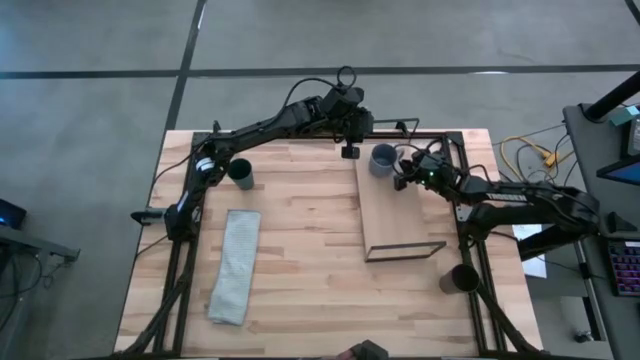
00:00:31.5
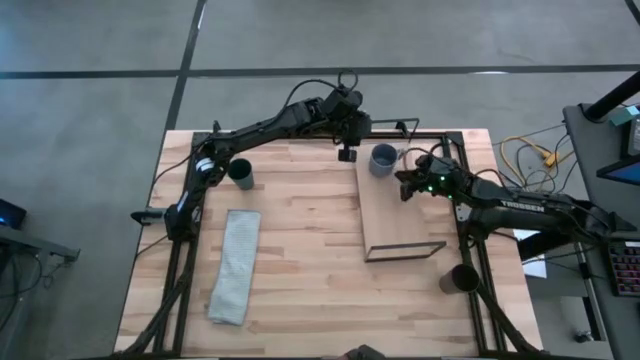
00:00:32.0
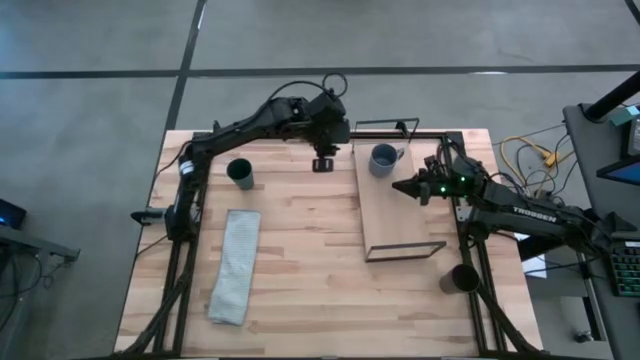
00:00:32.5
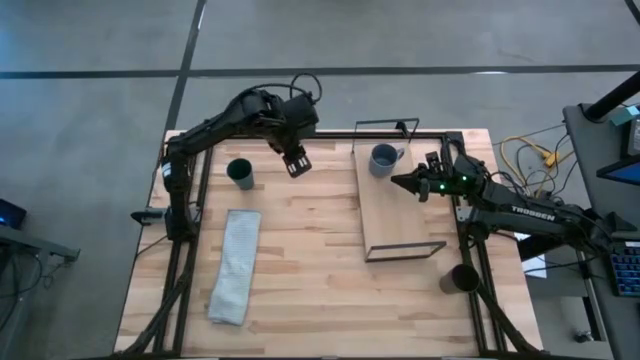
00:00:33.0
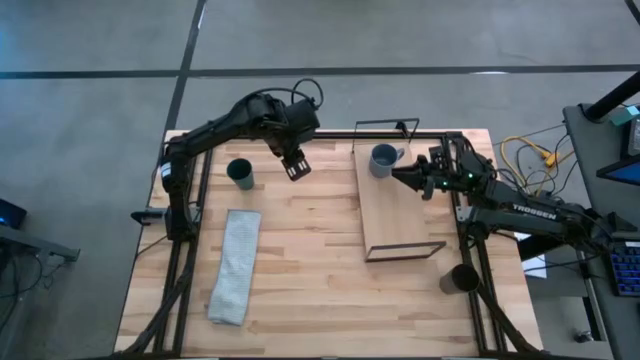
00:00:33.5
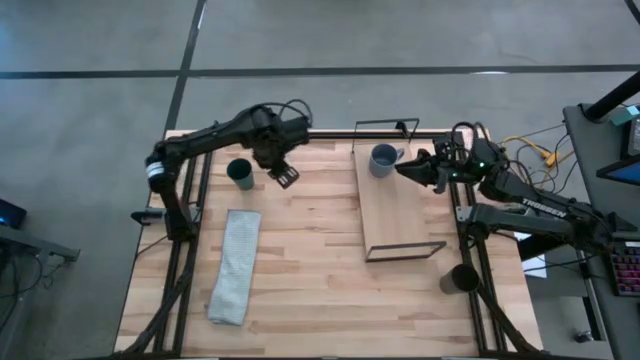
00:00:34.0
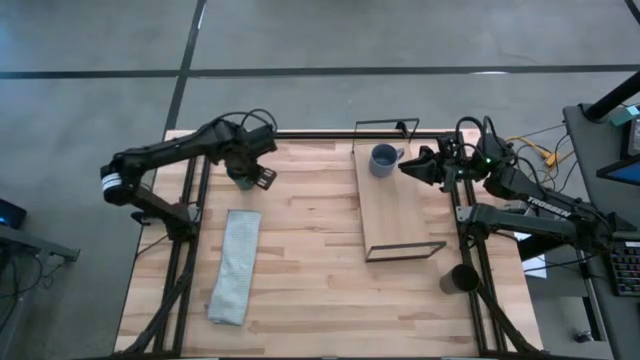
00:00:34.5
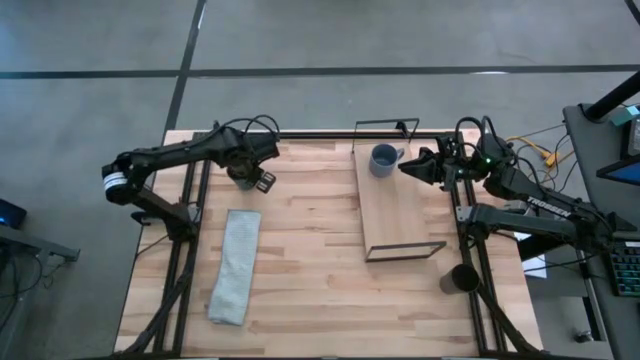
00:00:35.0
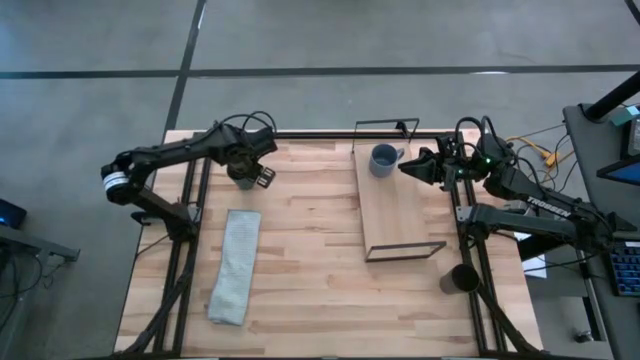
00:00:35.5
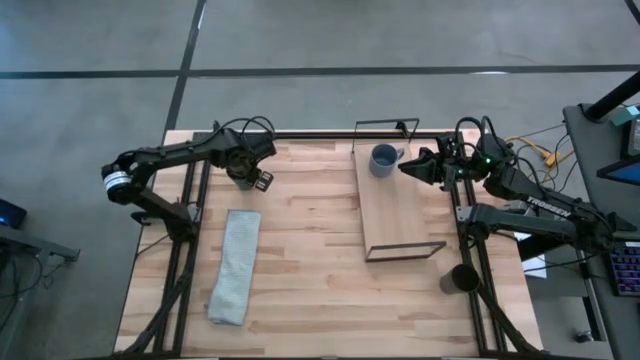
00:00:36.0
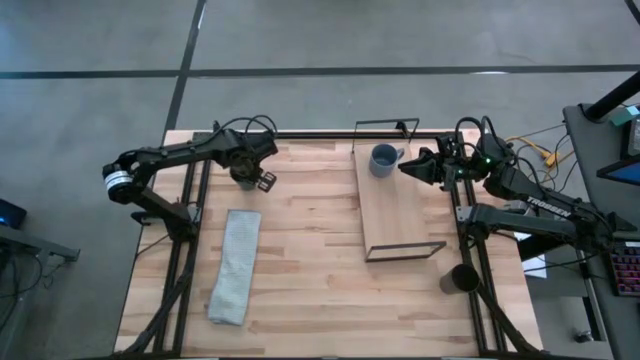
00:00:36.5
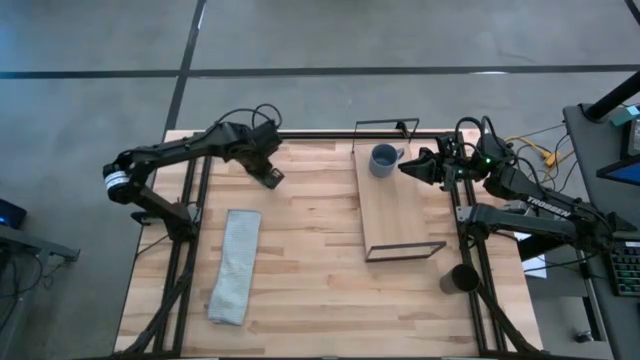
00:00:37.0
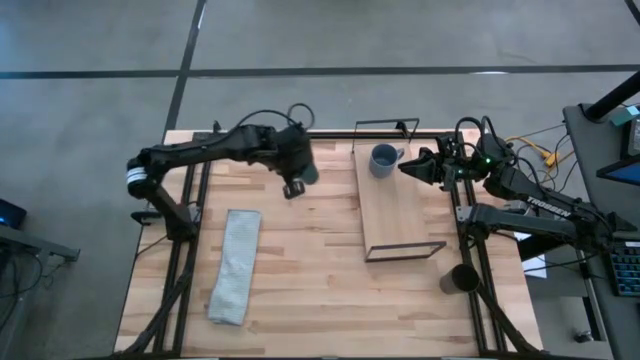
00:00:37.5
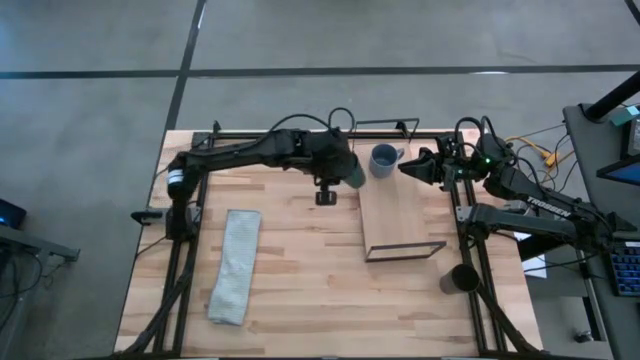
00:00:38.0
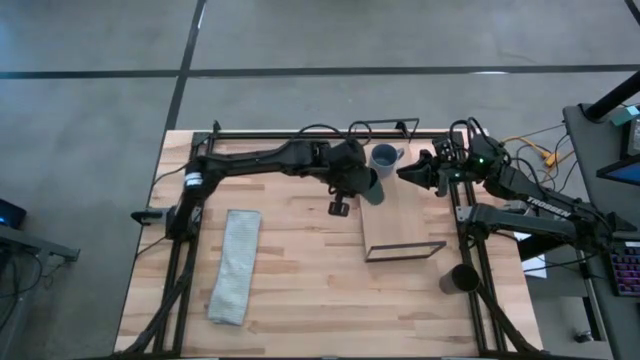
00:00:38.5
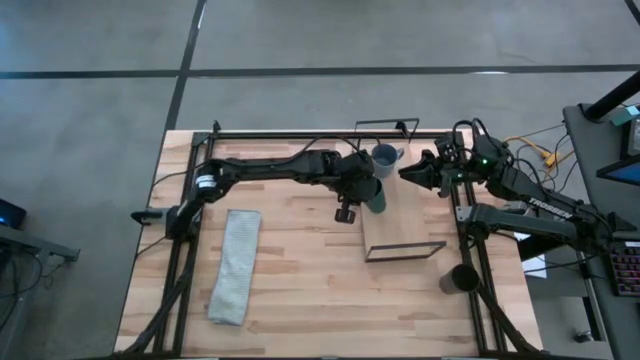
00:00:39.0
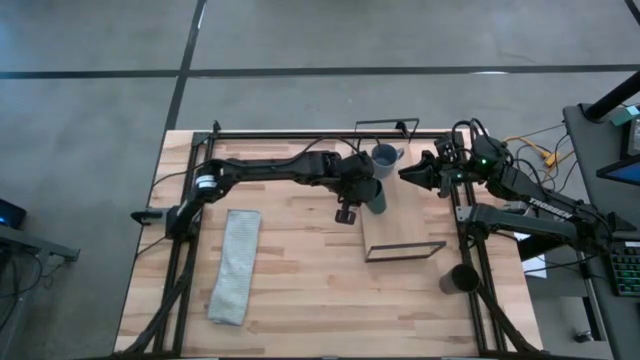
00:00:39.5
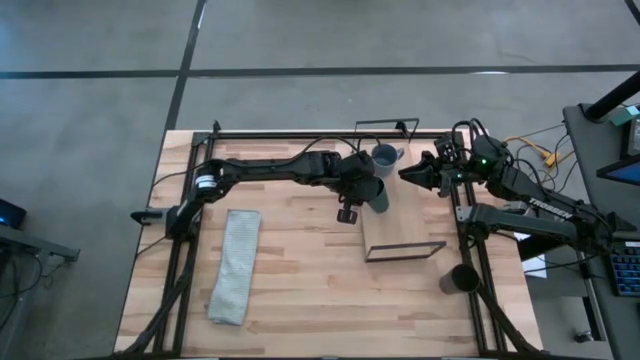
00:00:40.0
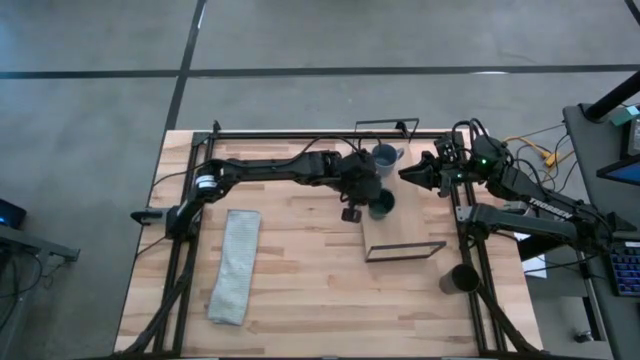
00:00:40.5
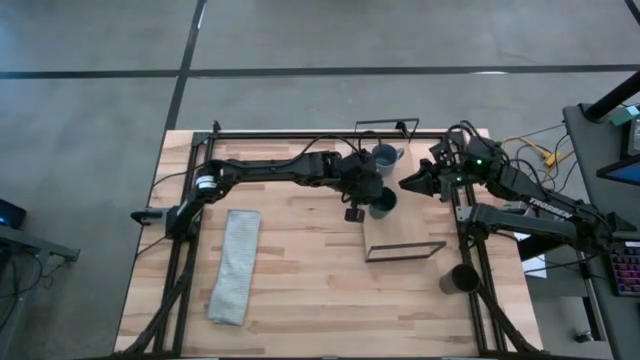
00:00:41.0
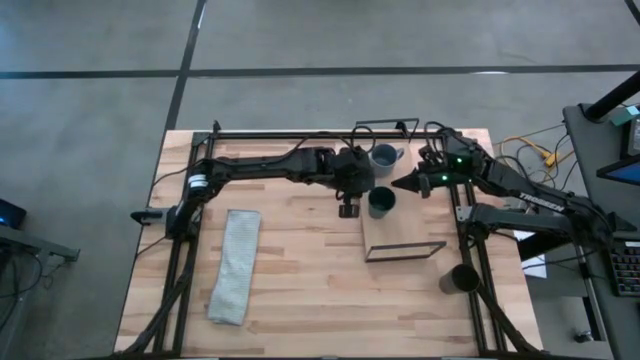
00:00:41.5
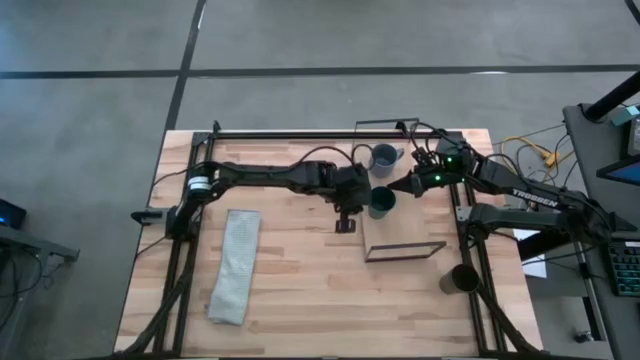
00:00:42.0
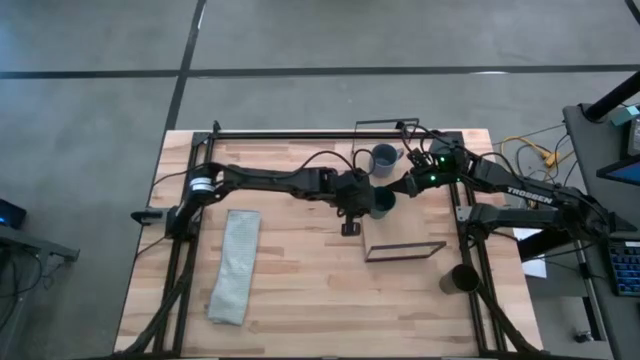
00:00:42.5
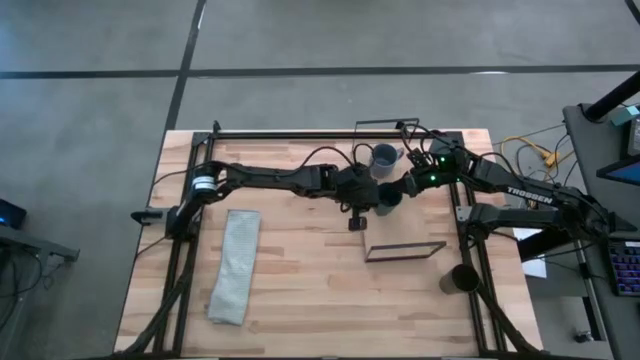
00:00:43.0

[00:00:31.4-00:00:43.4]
Task: Stack small to large cups/mugs on shelf
Put the blue cup on the shelf

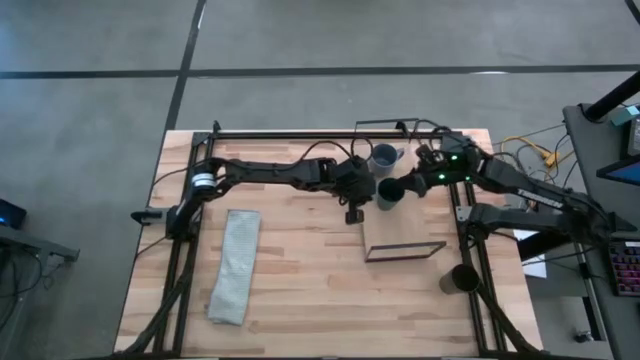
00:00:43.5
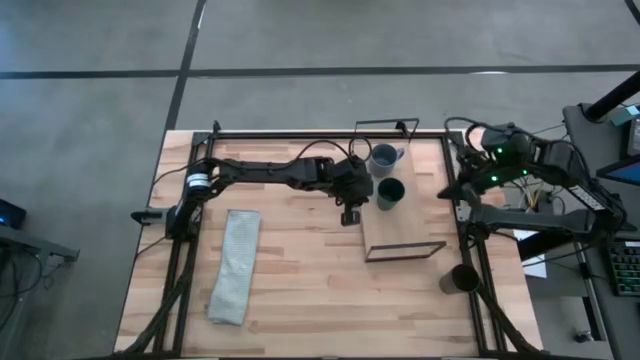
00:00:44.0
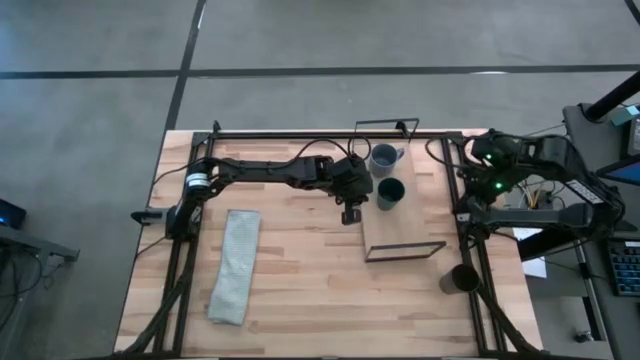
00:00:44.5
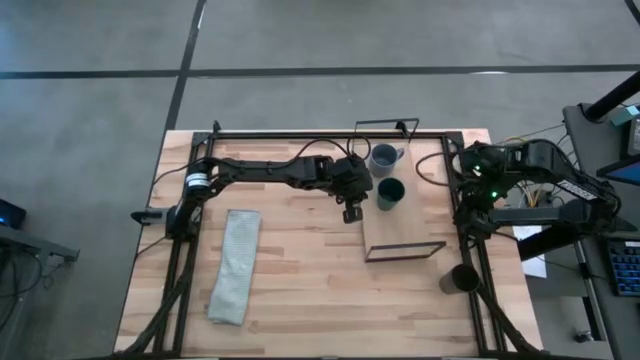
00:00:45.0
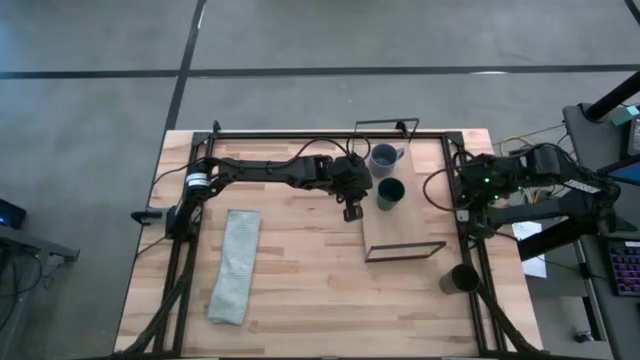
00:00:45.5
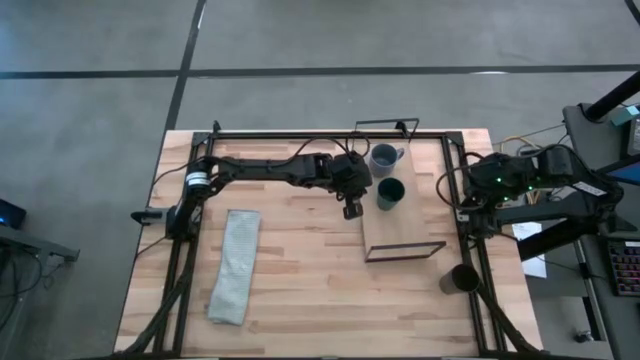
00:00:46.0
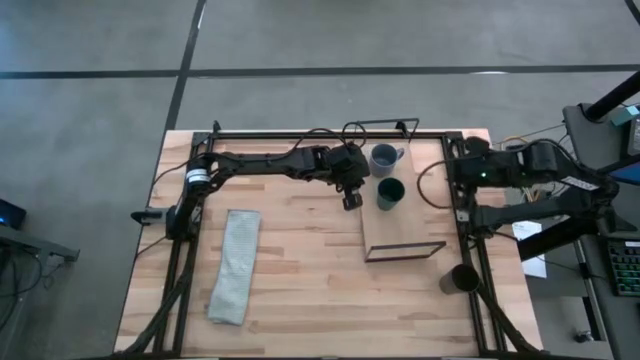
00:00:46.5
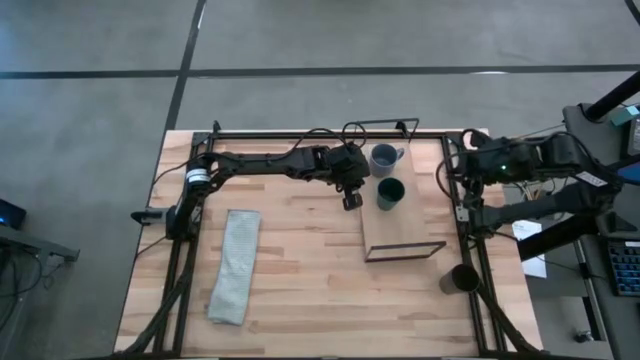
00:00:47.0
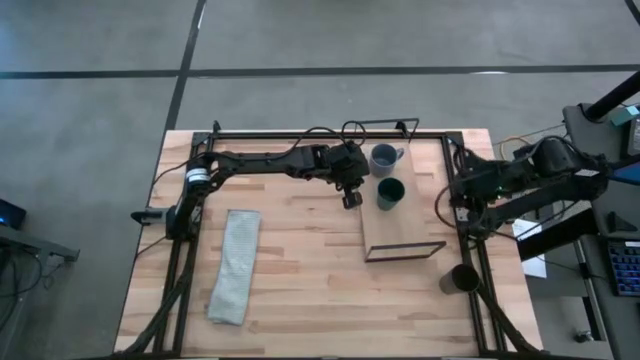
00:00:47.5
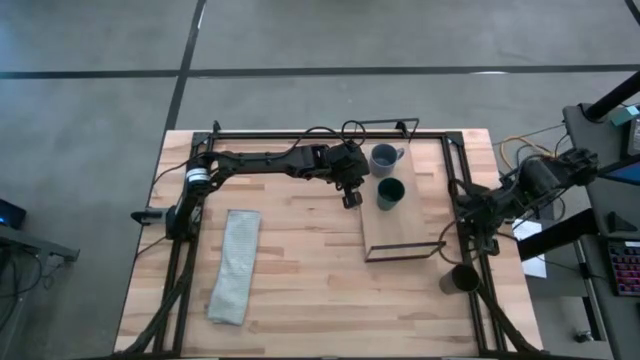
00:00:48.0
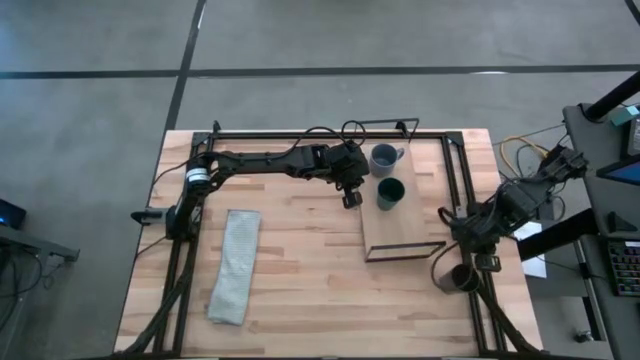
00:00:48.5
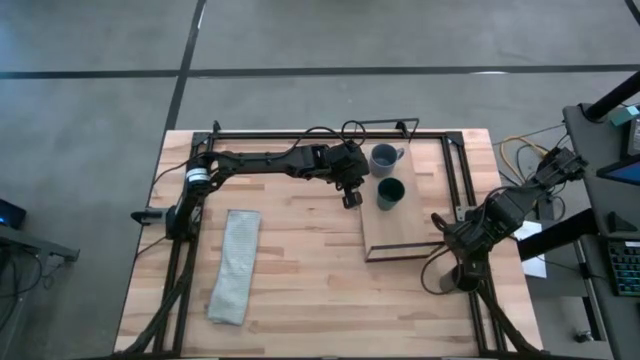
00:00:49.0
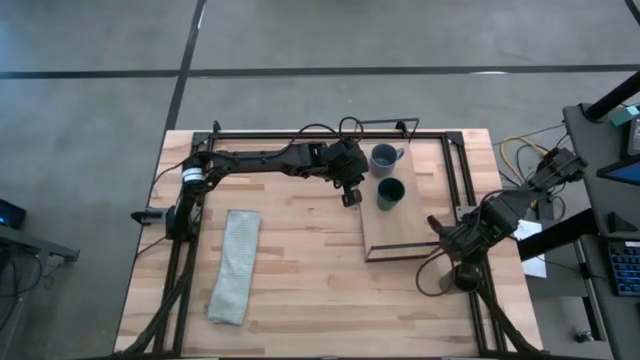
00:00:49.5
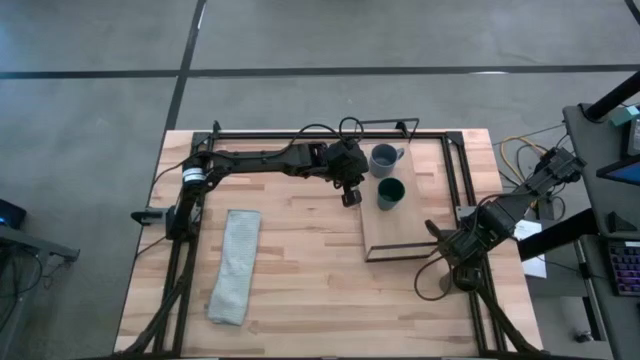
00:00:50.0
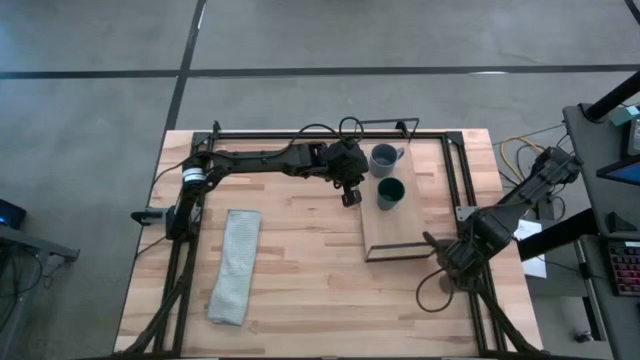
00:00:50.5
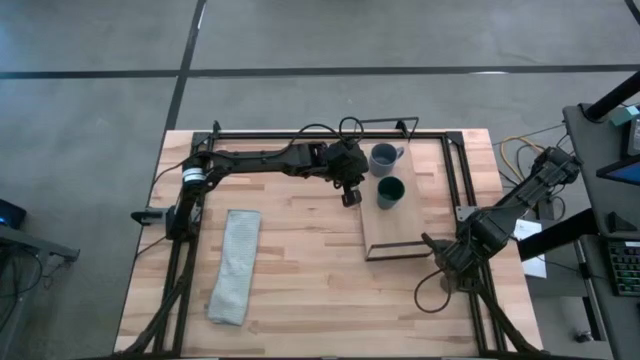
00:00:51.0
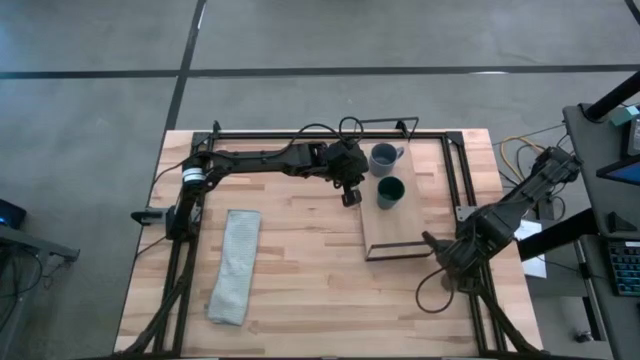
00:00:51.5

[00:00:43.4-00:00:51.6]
Put the black cup on the shelf

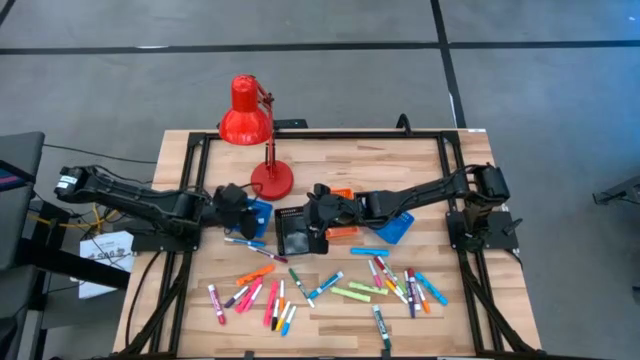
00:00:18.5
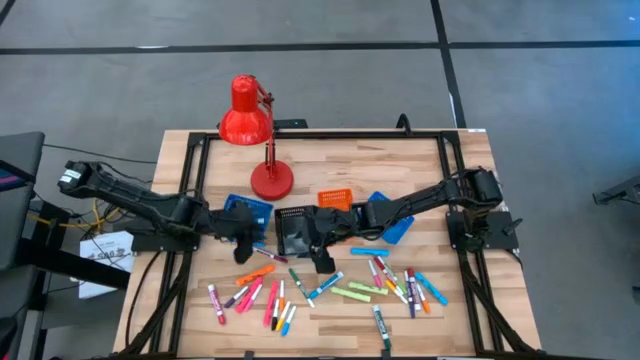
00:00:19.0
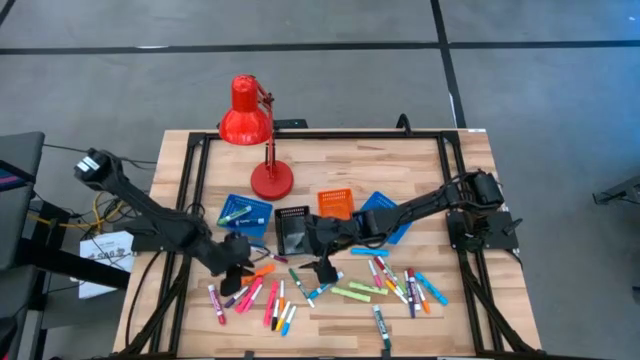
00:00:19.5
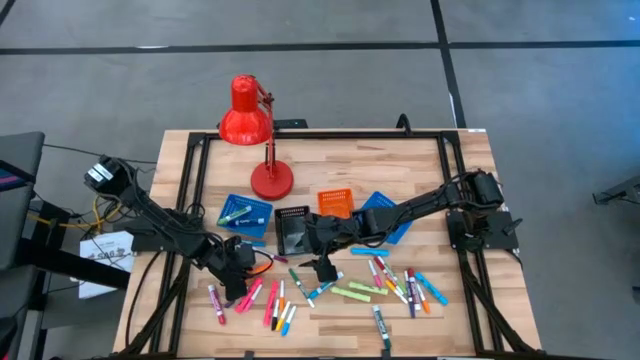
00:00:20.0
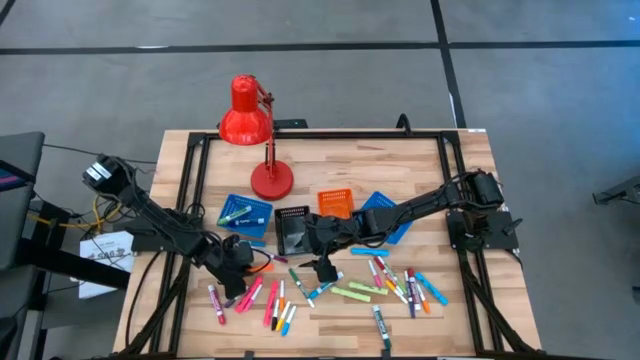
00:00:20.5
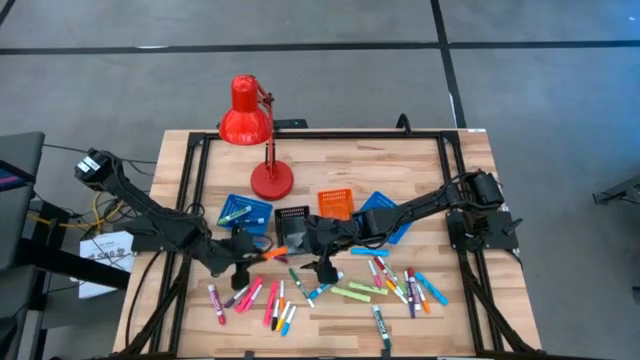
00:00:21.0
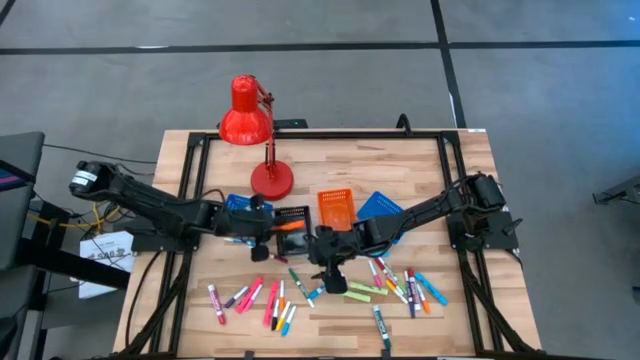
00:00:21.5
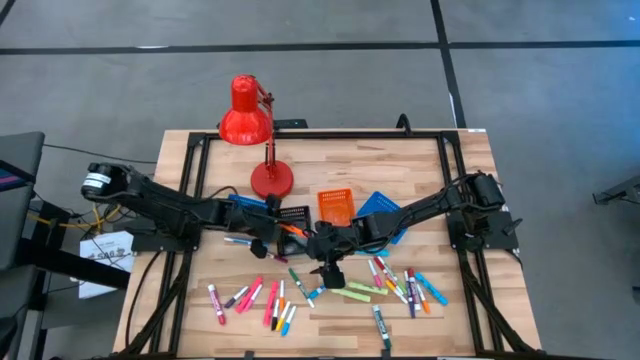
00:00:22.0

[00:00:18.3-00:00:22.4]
Task: Pick & Place Markers
Put the large orange highlighter pen into the black basket
